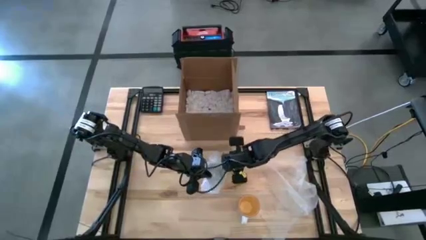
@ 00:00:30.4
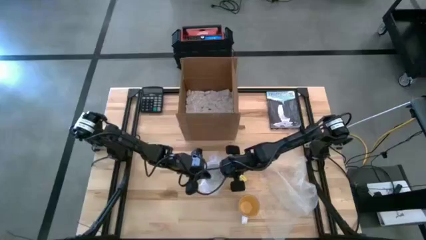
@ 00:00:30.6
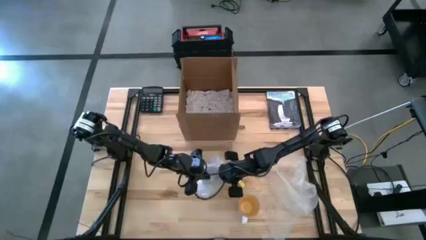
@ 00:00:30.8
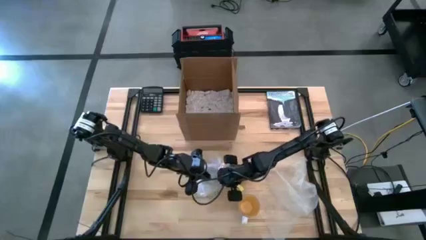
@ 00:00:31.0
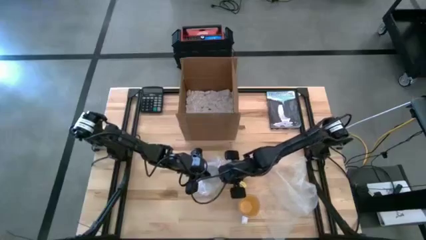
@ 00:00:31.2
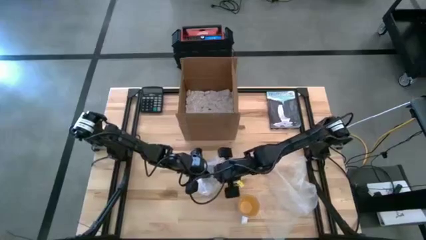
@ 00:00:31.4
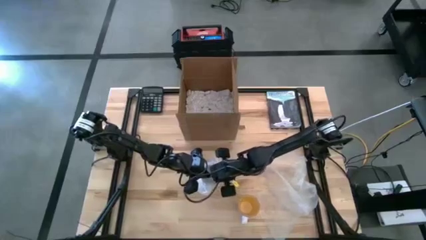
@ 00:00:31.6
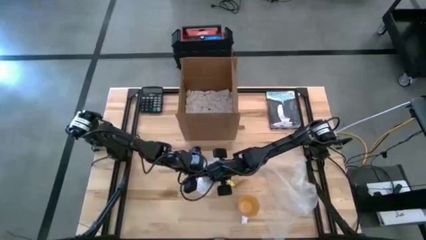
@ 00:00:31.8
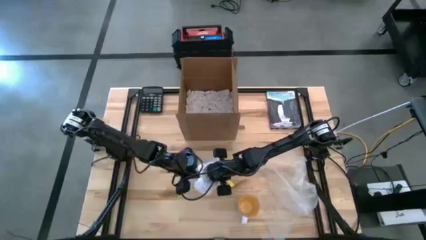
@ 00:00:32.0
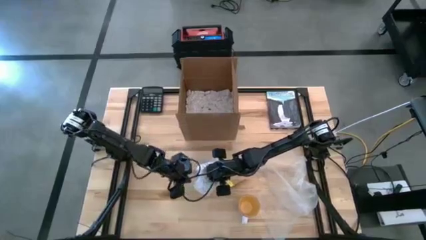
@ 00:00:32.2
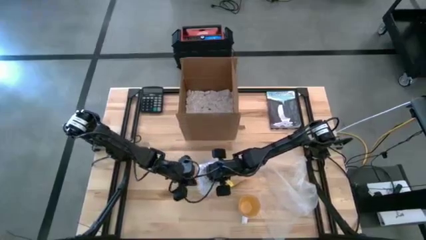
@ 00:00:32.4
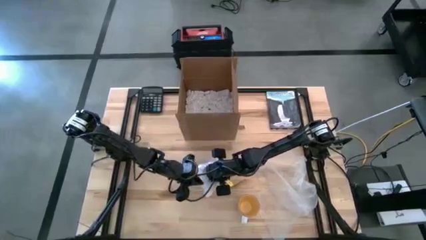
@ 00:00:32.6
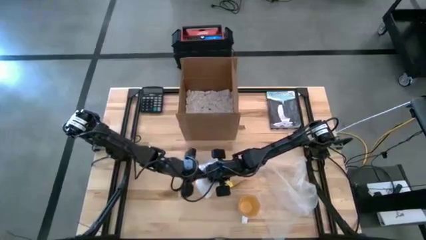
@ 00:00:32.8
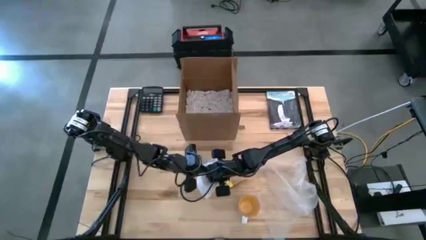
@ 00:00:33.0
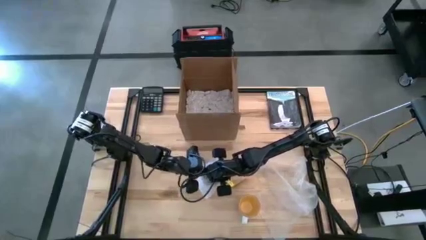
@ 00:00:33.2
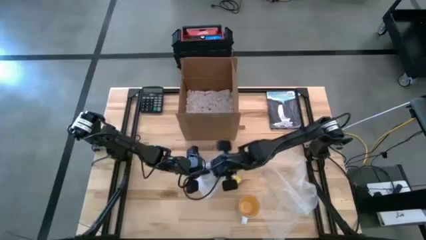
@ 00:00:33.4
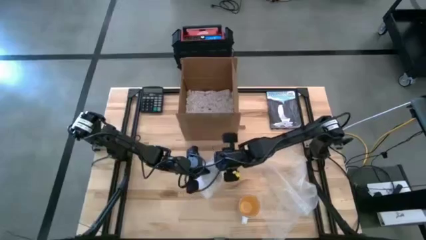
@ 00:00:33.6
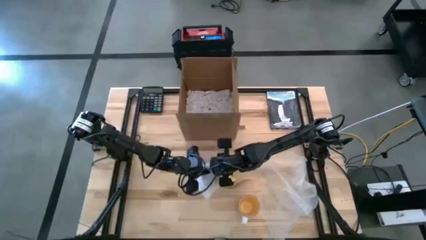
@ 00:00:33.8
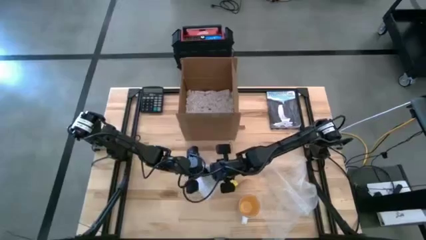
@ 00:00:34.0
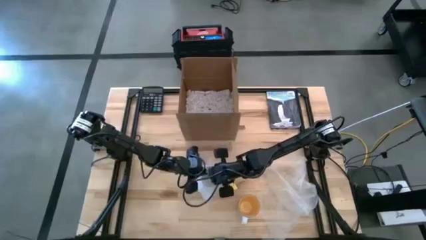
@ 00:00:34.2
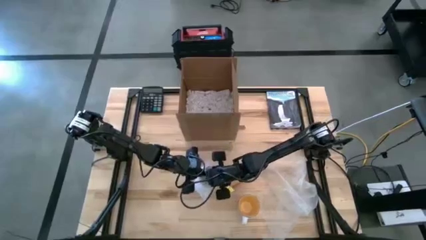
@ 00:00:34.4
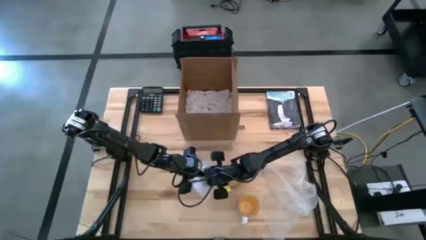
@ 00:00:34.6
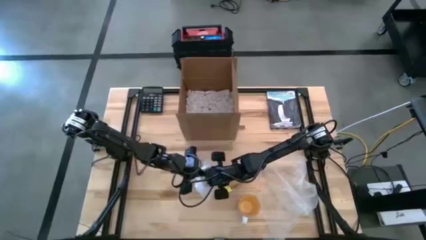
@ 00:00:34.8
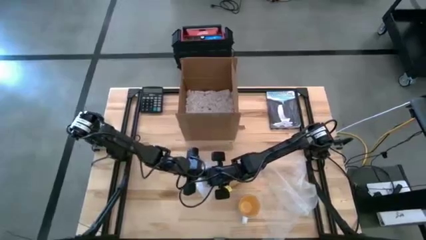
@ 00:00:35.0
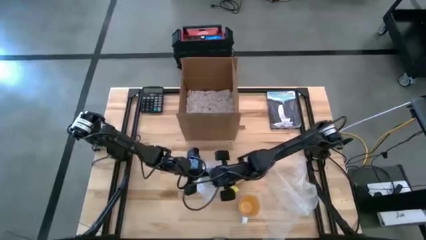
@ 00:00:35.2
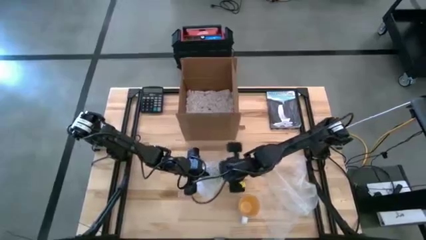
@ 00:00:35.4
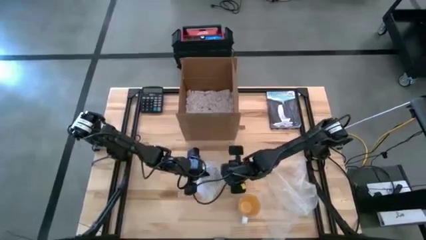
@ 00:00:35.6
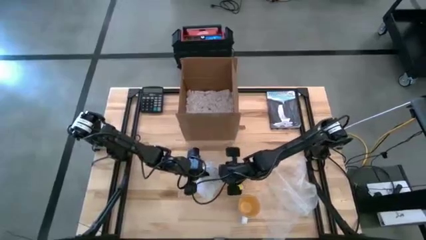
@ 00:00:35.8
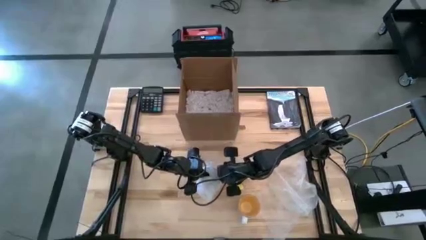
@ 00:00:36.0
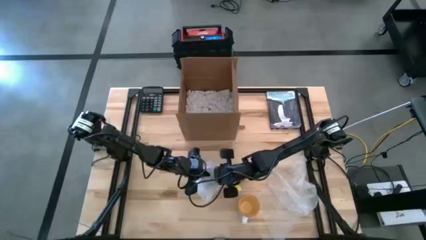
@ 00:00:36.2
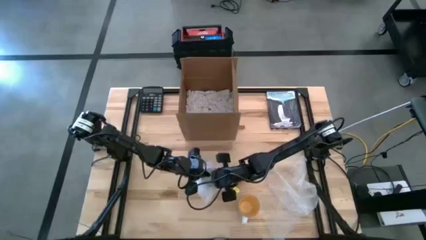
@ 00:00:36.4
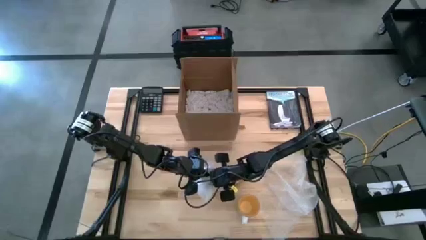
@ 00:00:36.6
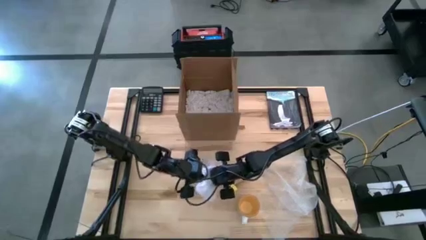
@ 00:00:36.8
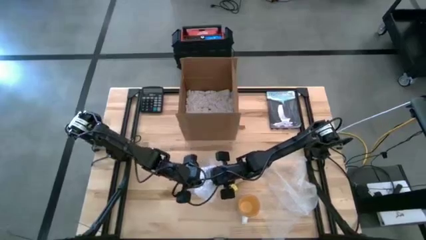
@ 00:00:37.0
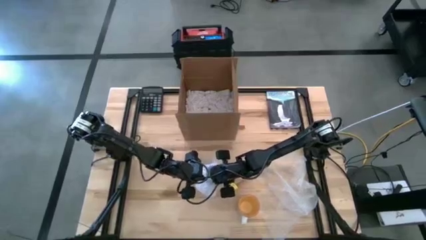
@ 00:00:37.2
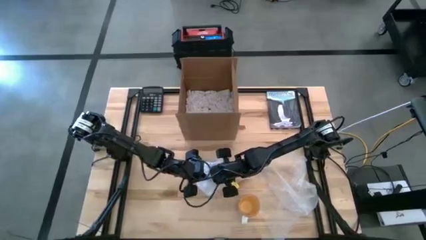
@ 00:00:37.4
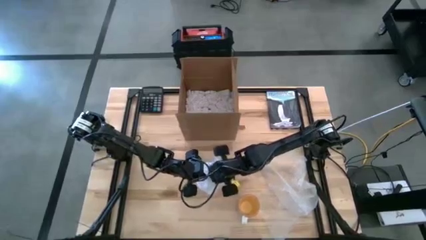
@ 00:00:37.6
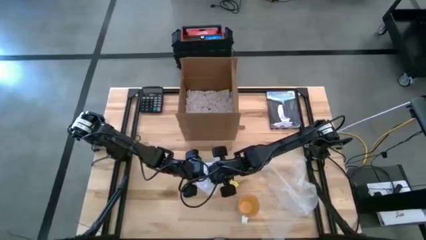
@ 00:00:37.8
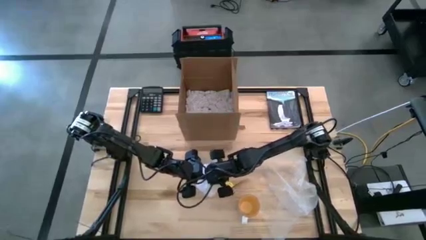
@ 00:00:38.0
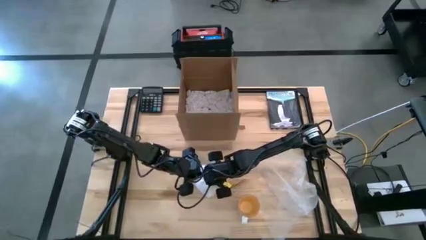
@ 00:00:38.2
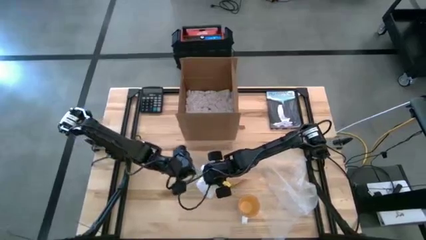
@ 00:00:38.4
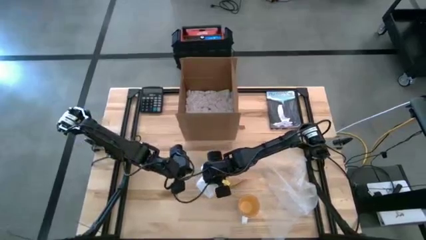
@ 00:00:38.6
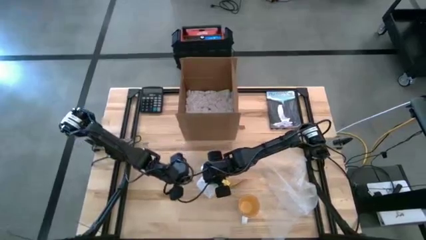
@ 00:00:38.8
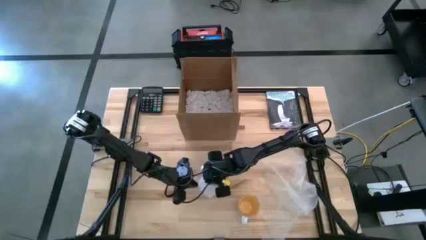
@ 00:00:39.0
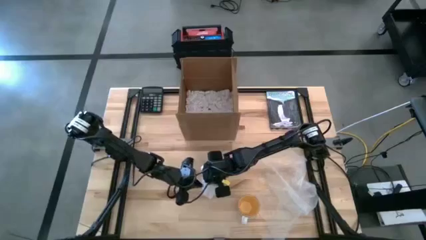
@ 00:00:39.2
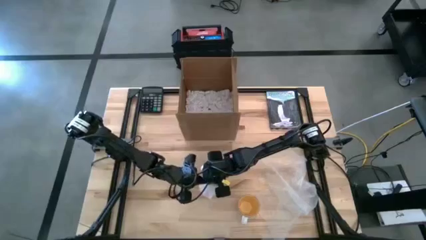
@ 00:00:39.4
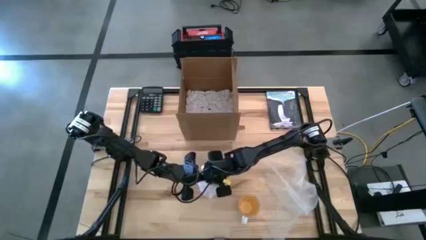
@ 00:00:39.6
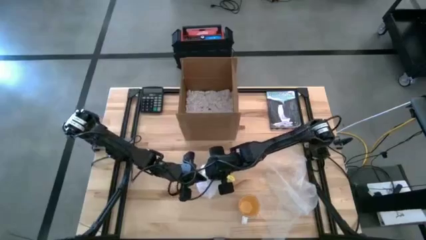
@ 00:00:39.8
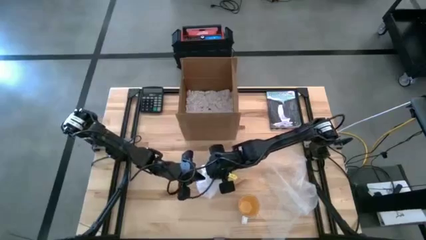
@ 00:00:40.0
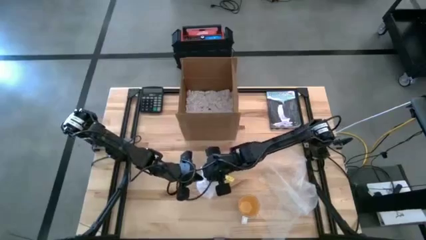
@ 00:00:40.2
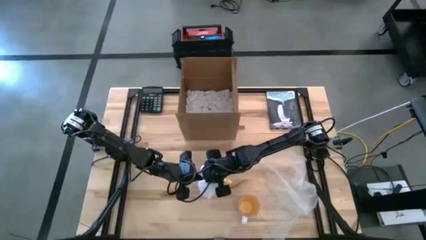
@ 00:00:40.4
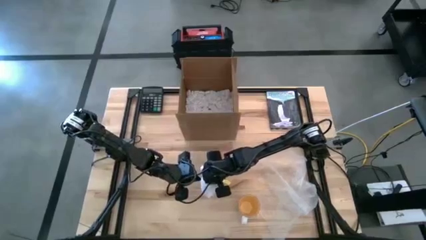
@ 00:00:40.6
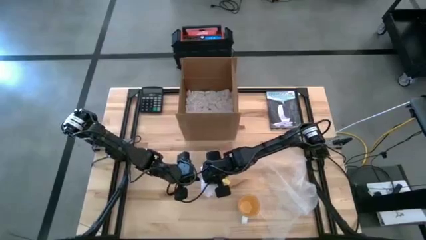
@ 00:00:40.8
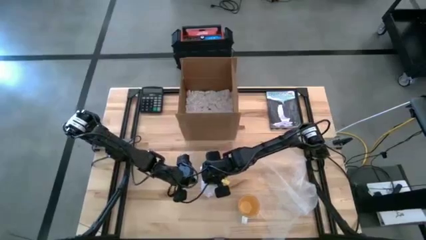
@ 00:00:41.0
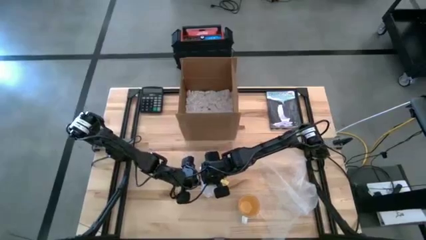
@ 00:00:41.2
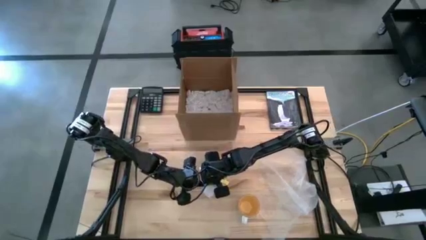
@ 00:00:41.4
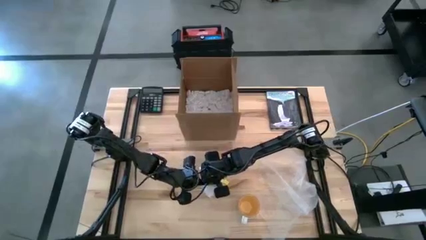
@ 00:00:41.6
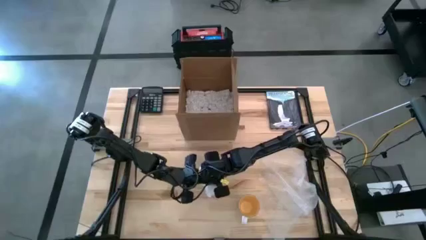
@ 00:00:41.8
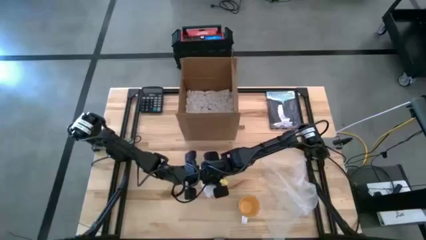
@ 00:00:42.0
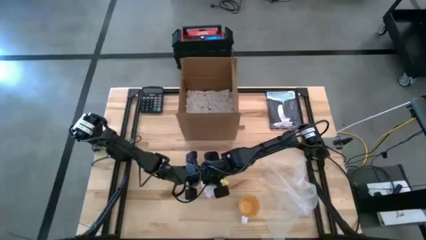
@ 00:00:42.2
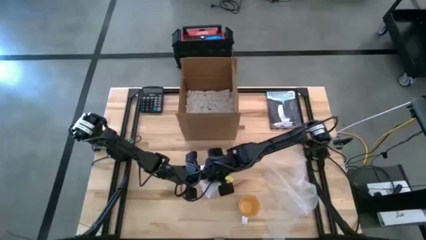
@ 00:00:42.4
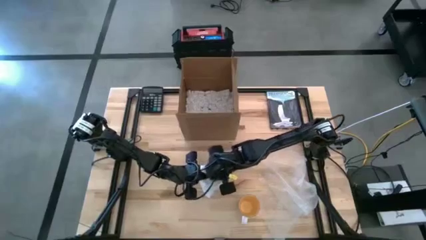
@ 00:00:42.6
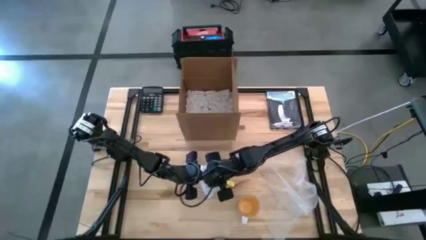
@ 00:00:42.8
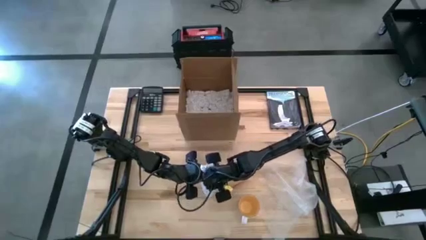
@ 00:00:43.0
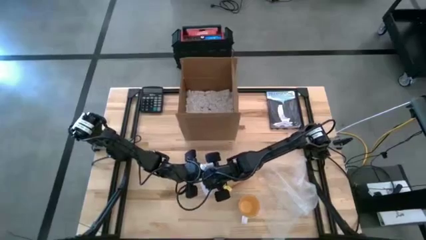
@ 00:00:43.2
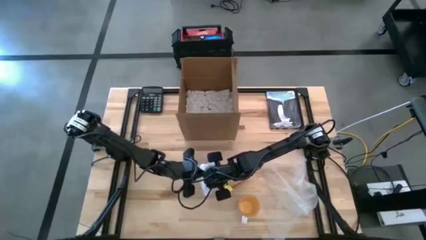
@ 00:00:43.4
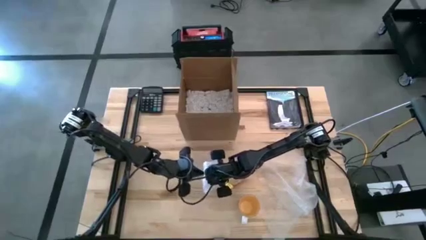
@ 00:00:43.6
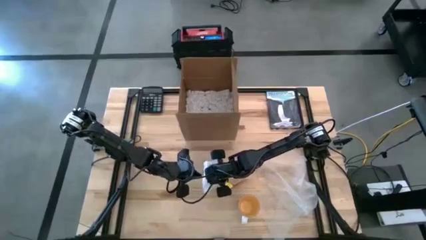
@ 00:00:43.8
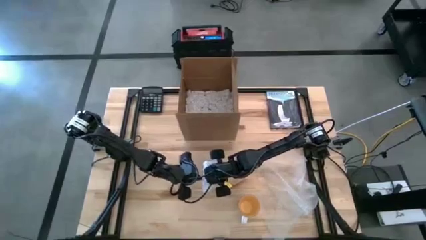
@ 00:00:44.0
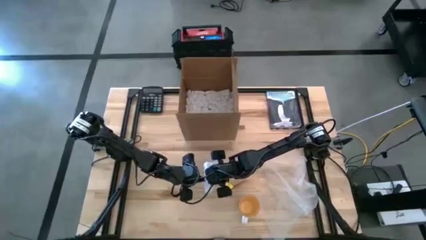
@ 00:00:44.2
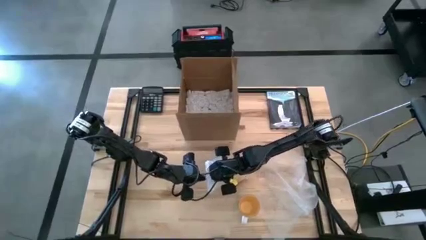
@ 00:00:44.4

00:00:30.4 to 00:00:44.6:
Task: wrap mug
Wrap the blue mug with bubble wrap

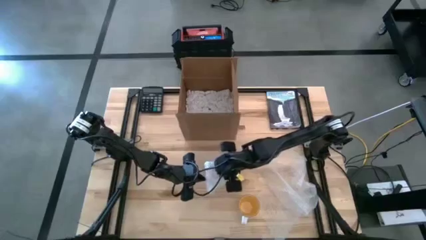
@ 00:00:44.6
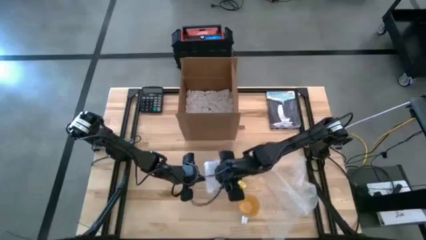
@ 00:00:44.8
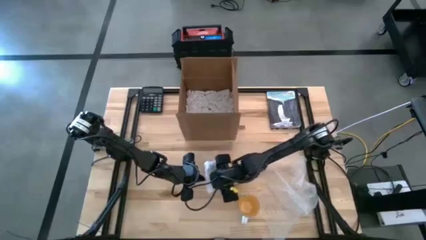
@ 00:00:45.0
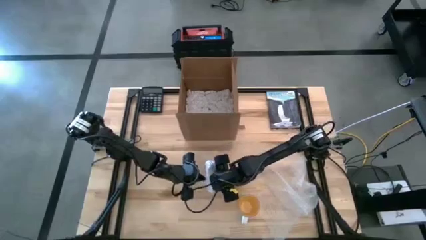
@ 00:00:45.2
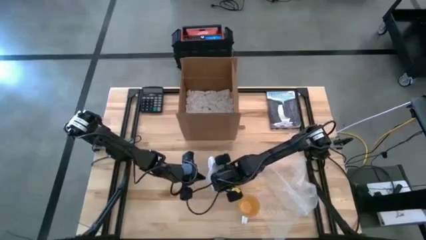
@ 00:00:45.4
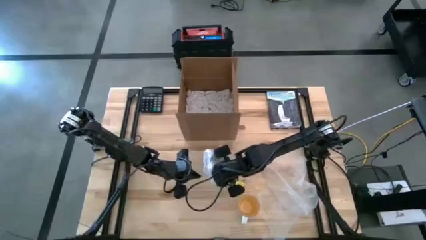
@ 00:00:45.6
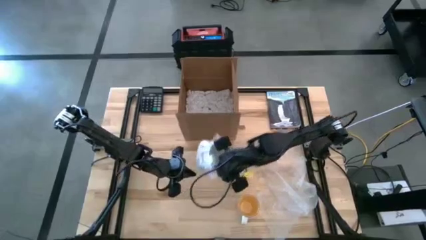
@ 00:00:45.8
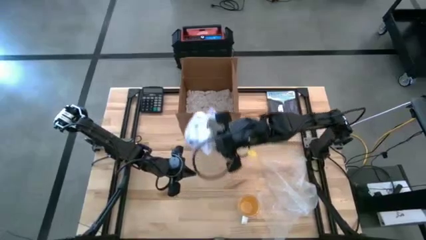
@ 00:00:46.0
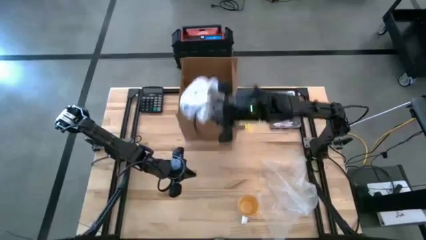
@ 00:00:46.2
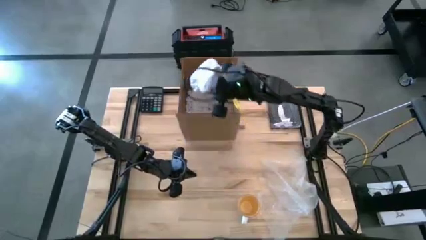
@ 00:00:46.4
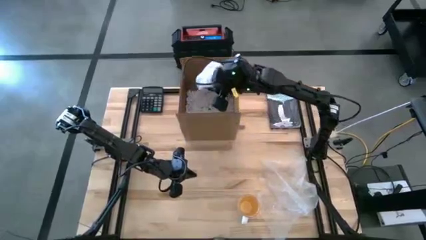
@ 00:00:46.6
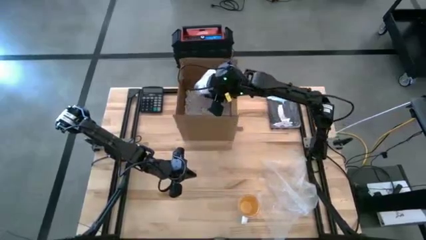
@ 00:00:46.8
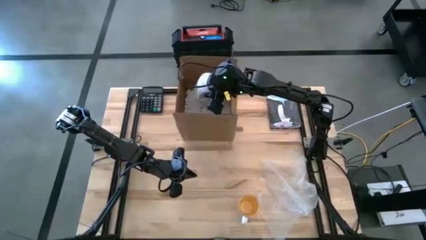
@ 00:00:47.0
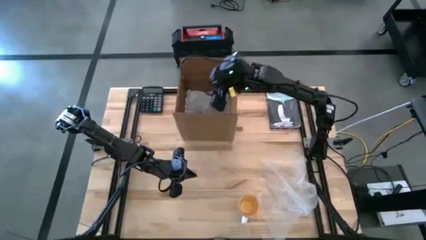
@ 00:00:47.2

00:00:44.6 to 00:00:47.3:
Put the wrapped blue mug into the cardboard box
